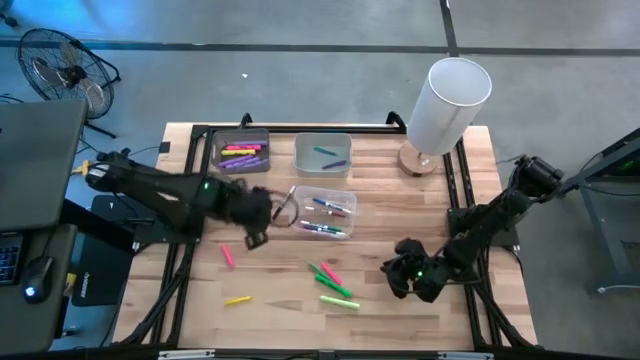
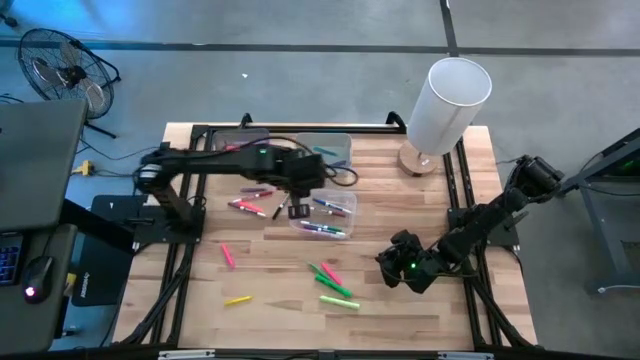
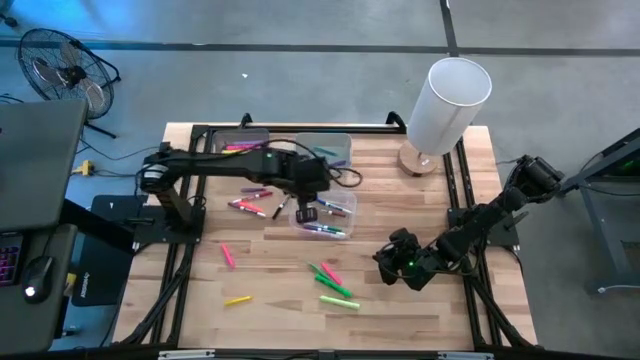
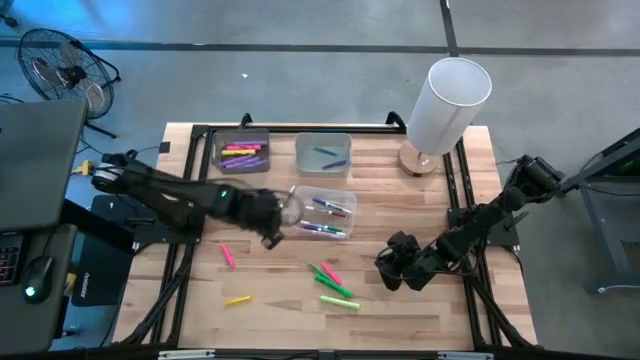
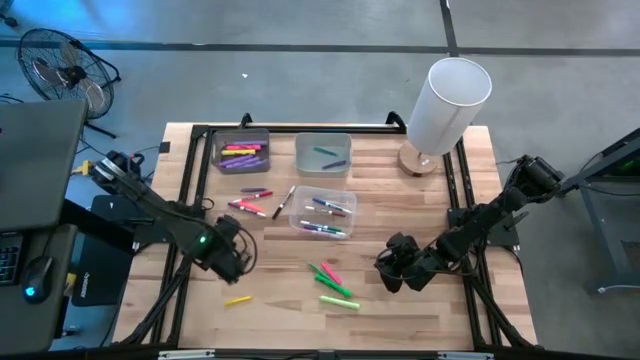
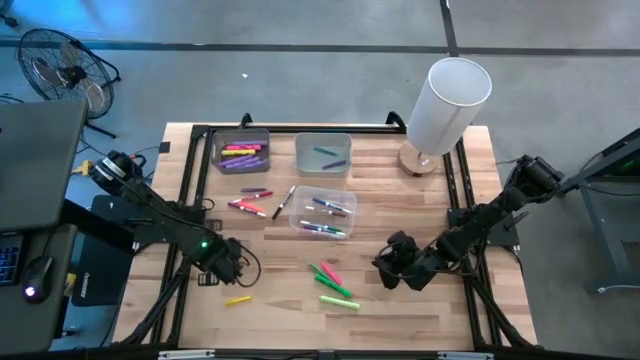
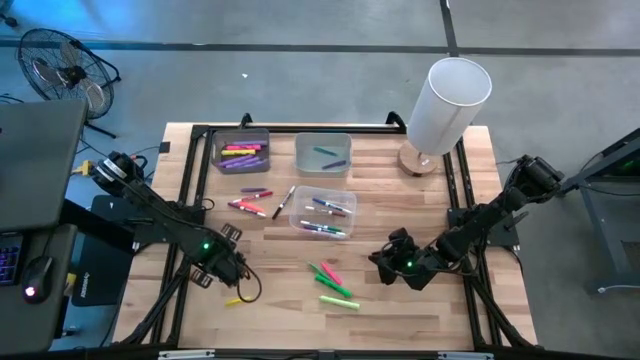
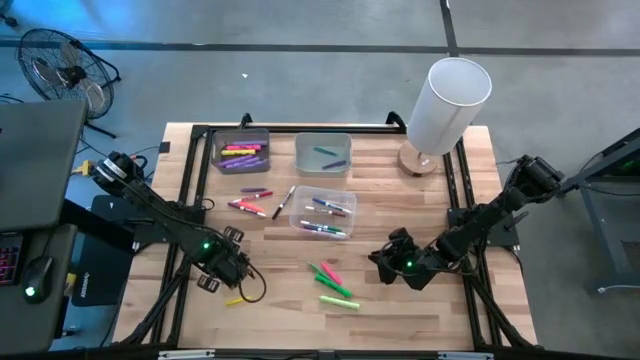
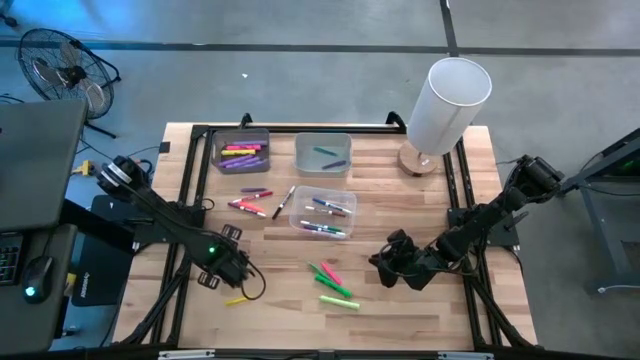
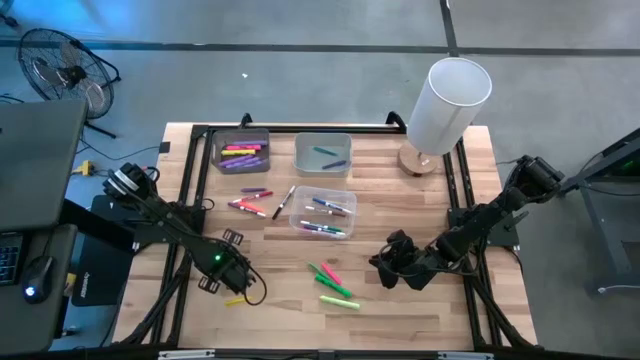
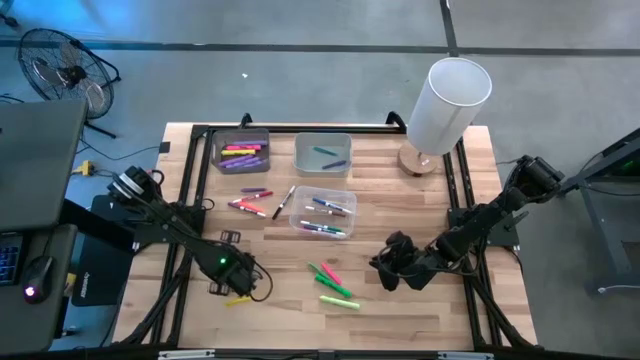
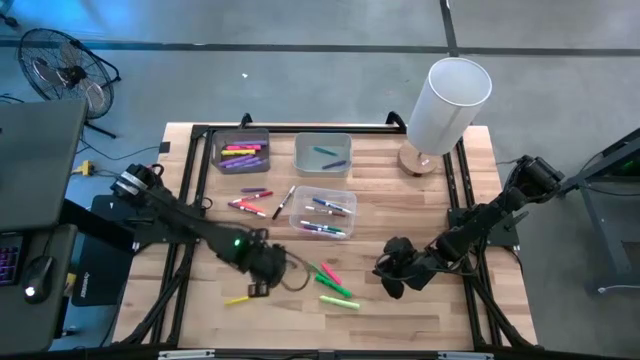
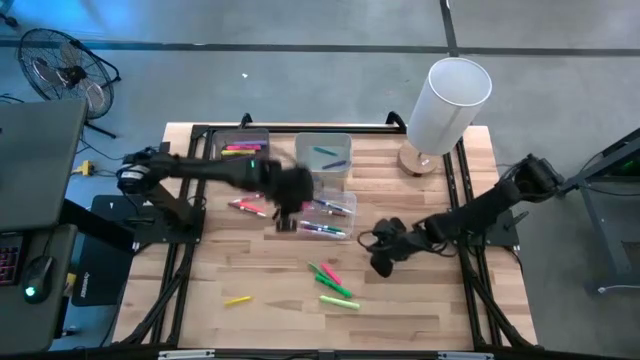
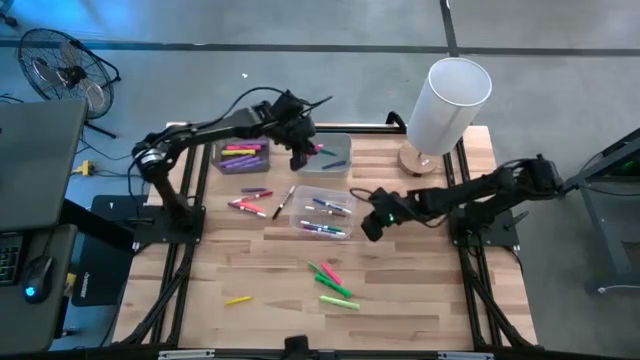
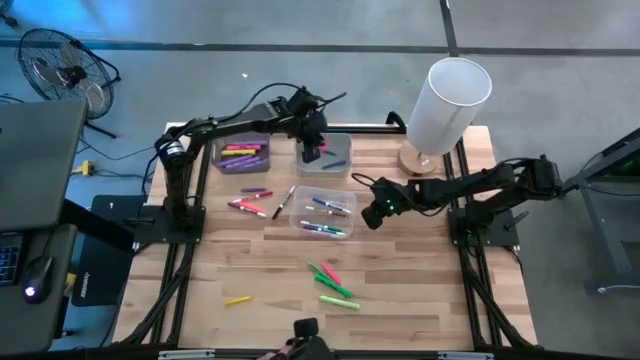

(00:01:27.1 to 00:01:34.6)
Task: Pick & Place Markers
Put the top pink pen into the gray bin

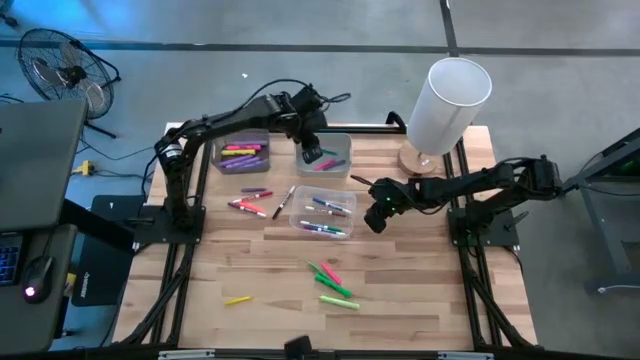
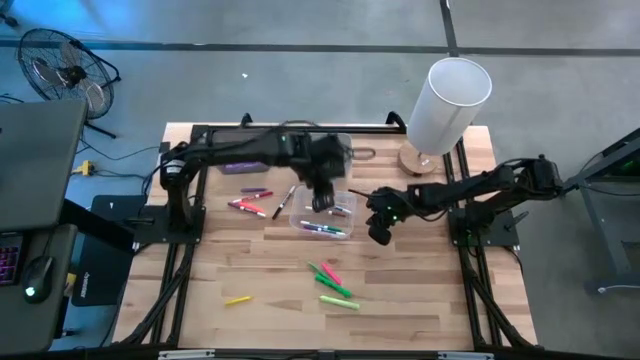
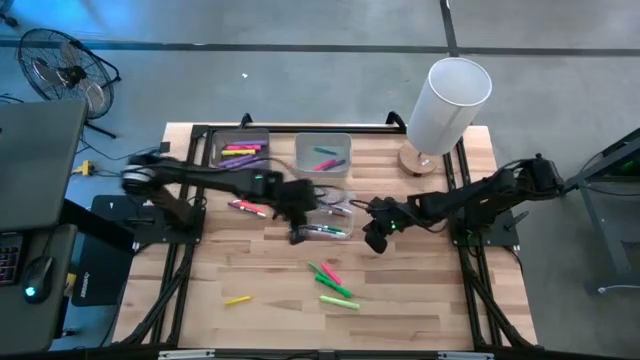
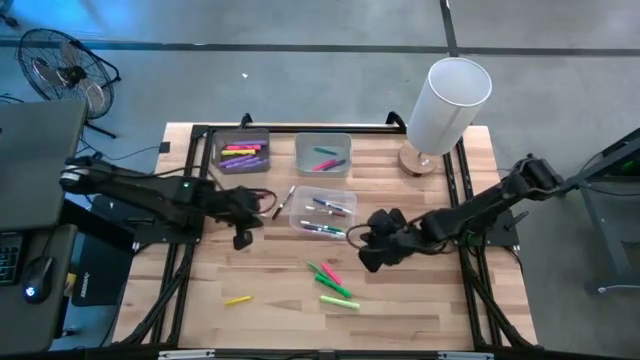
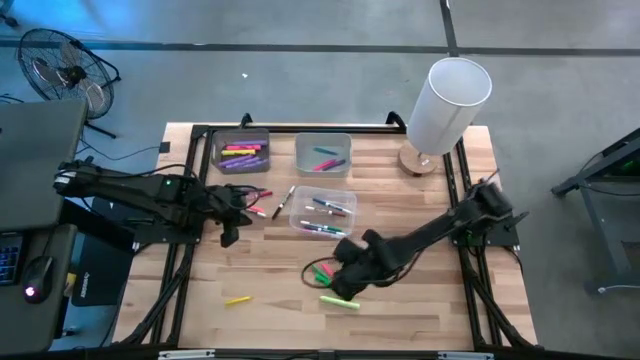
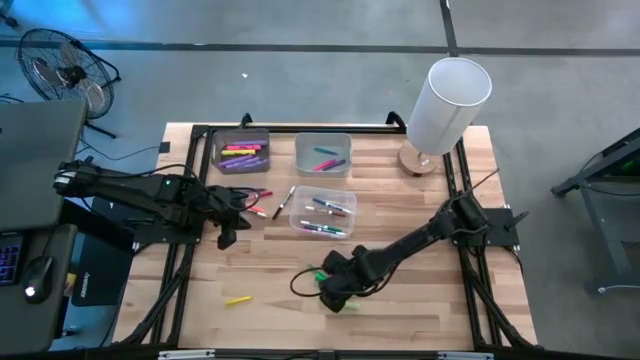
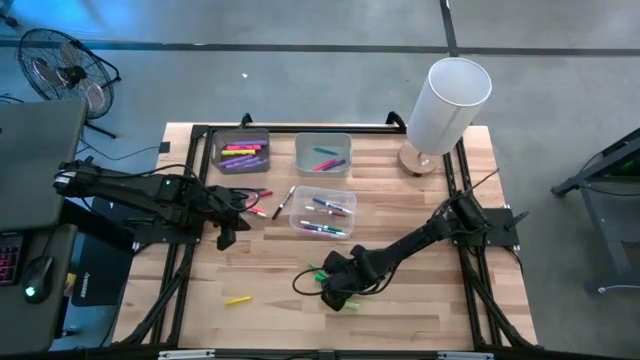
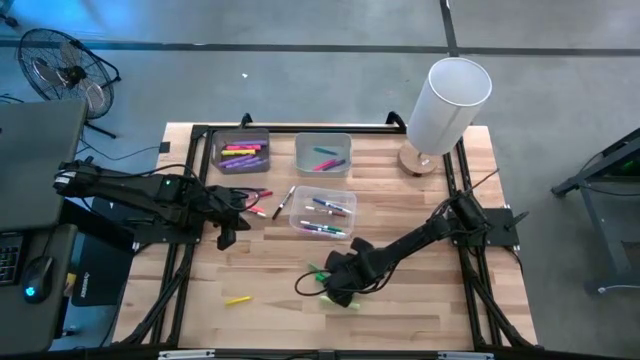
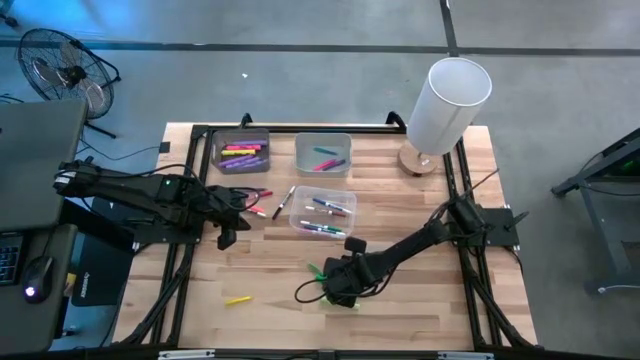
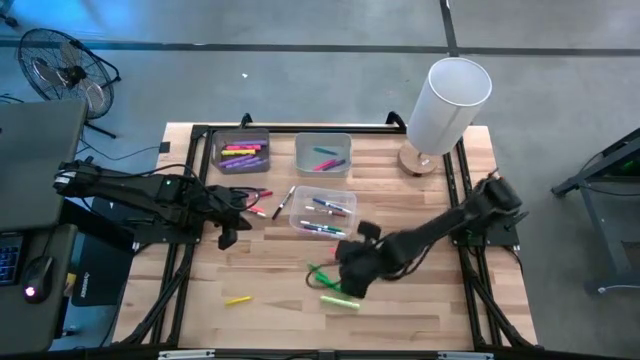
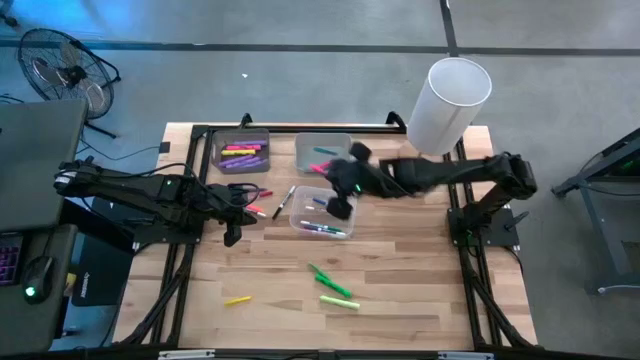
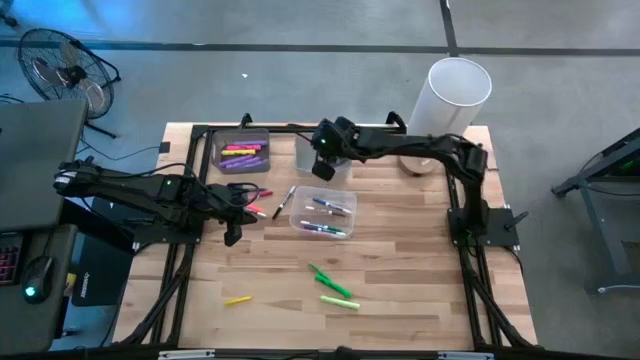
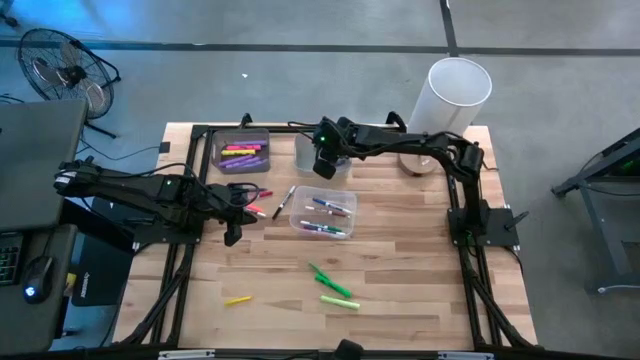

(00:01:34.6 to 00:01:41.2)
Put the pink pen into the gray bin

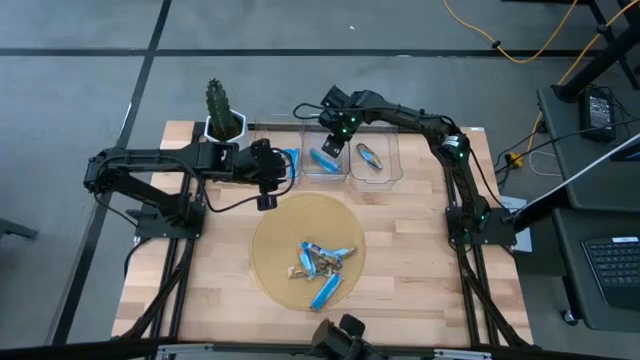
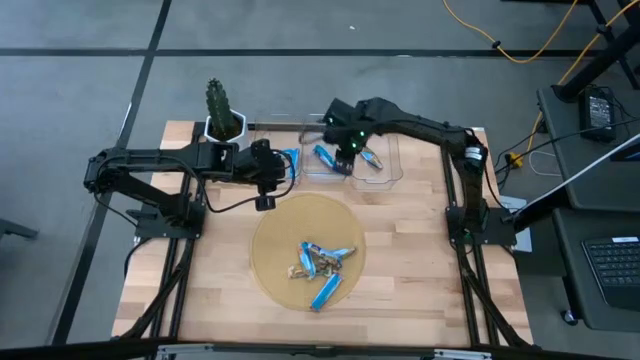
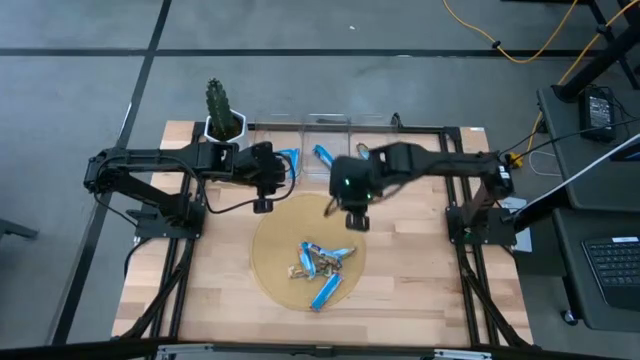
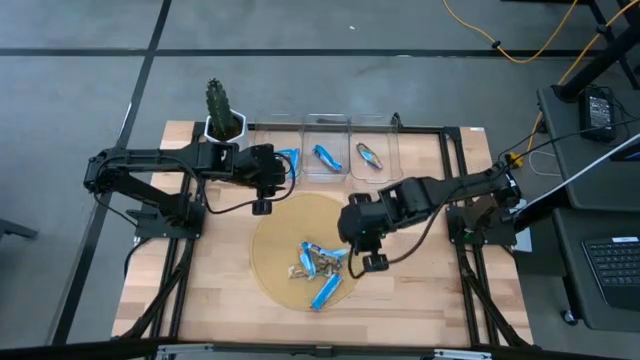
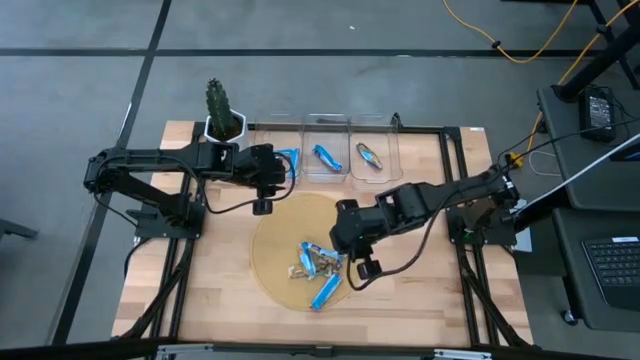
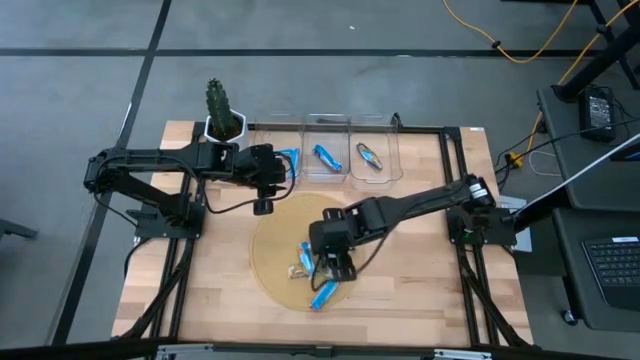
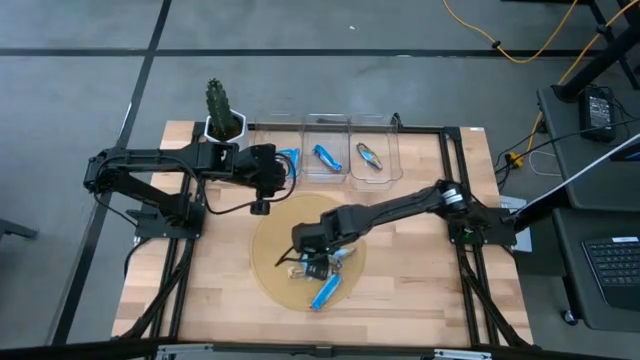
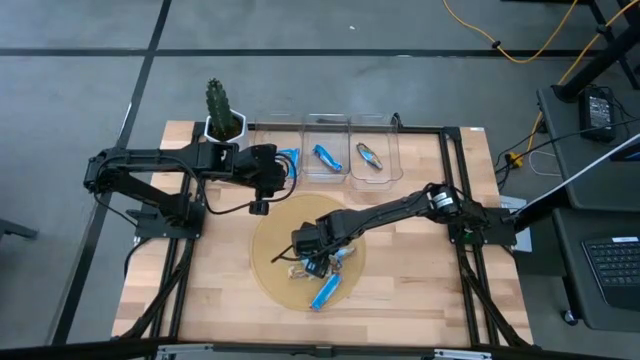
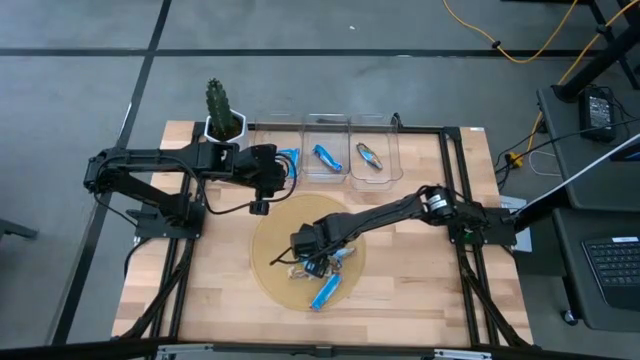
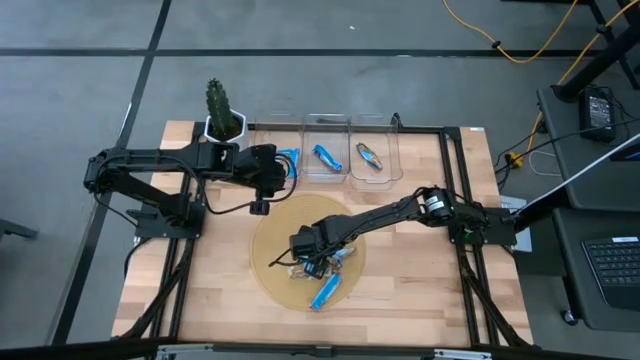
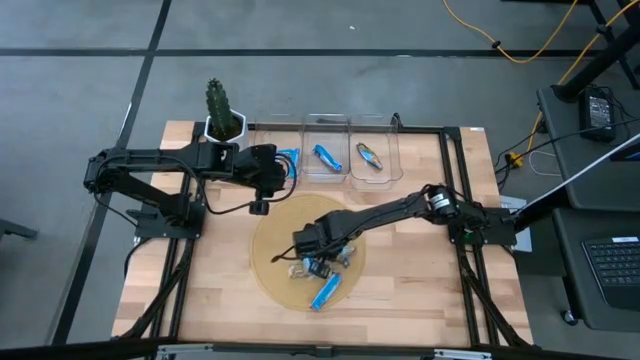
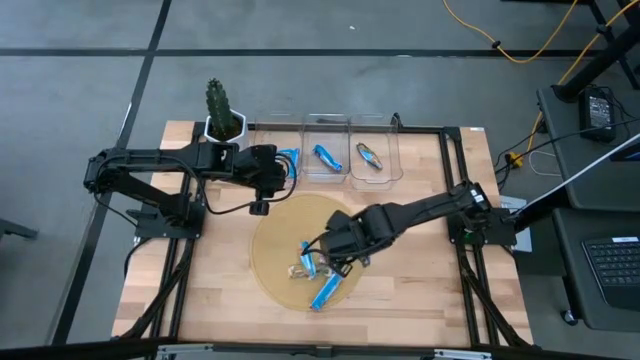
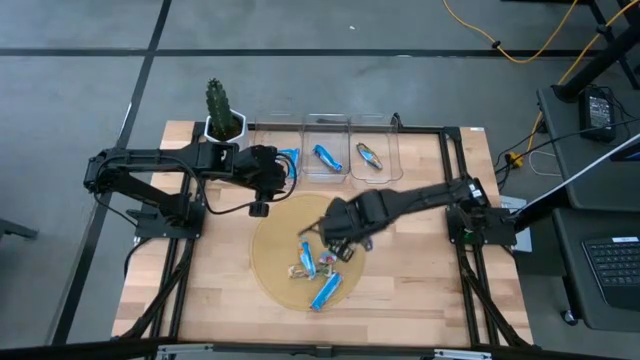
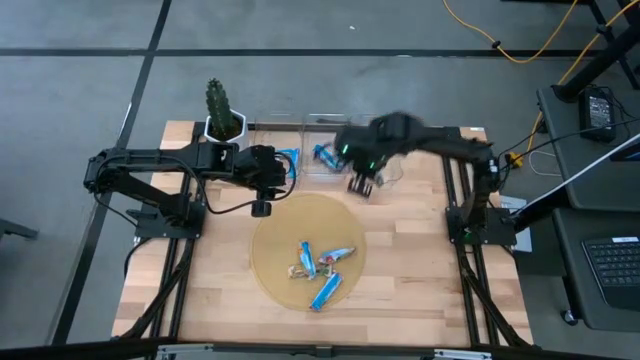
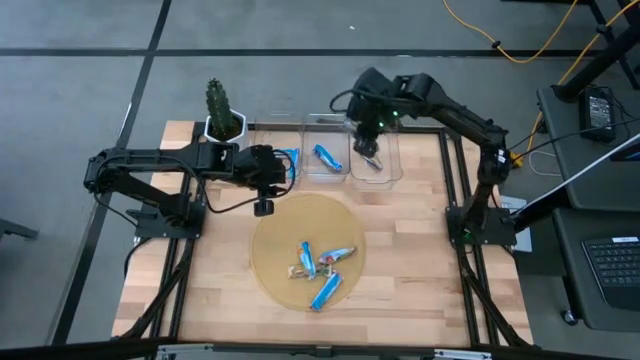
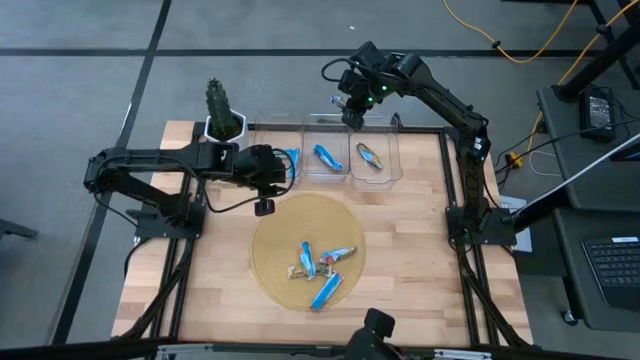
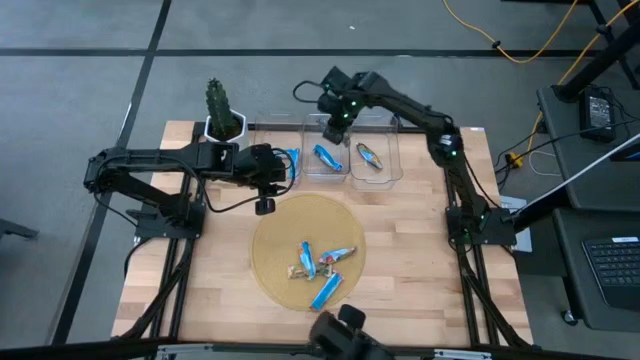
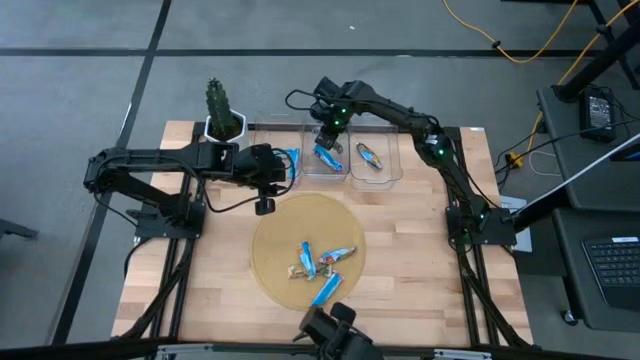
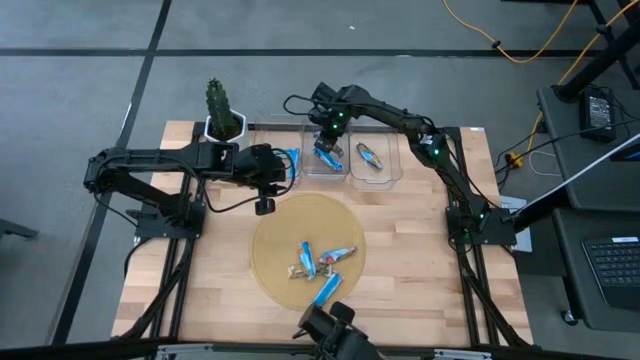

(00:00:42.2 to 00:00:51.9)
Task: Pick and place Granola Bars by type
Put the blue granola bar into the middle transparent bin
